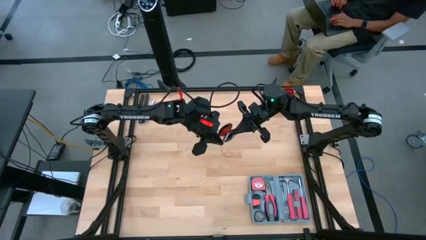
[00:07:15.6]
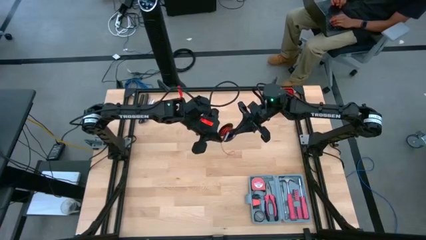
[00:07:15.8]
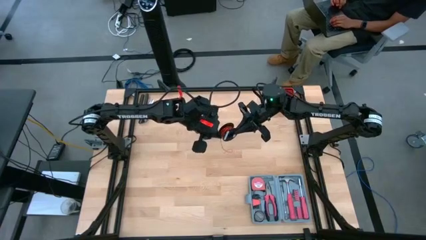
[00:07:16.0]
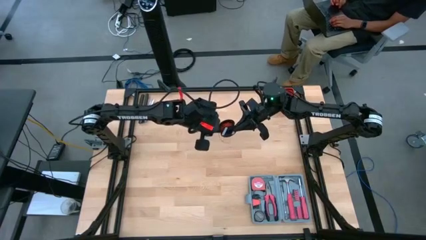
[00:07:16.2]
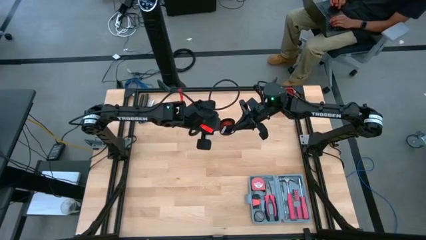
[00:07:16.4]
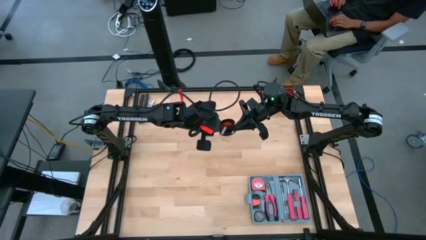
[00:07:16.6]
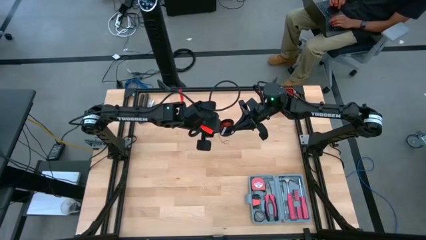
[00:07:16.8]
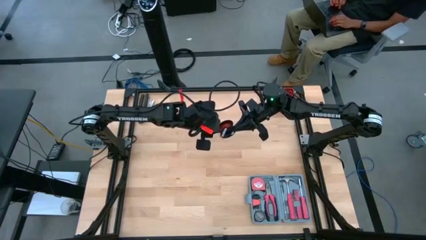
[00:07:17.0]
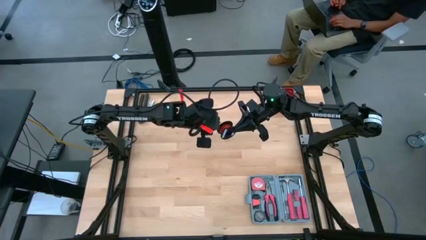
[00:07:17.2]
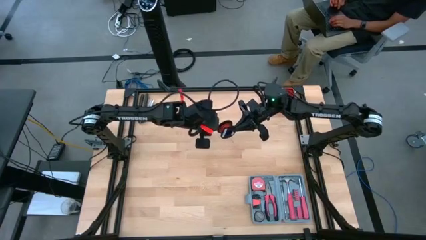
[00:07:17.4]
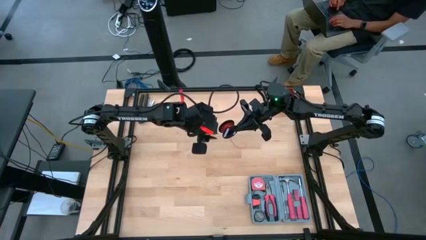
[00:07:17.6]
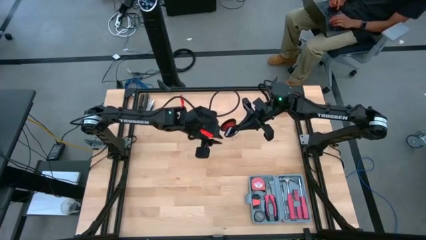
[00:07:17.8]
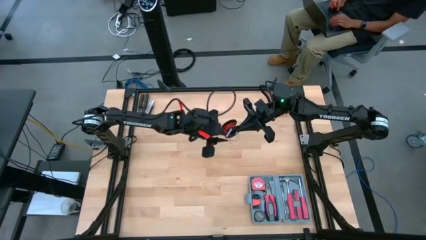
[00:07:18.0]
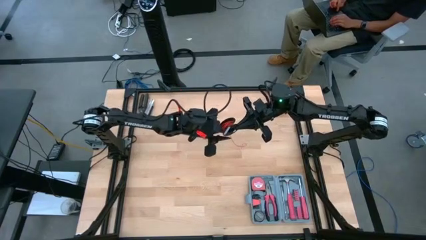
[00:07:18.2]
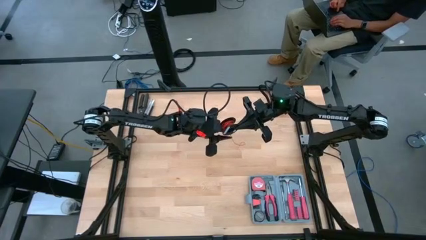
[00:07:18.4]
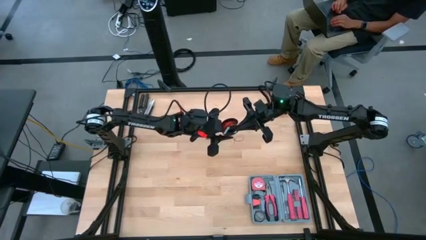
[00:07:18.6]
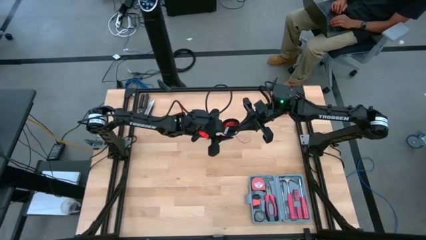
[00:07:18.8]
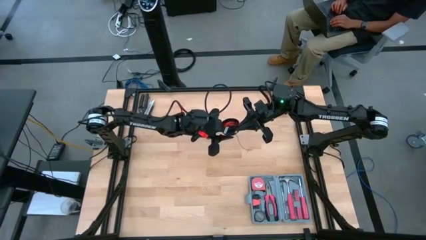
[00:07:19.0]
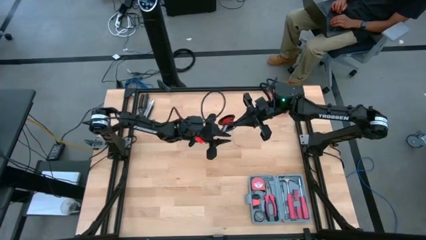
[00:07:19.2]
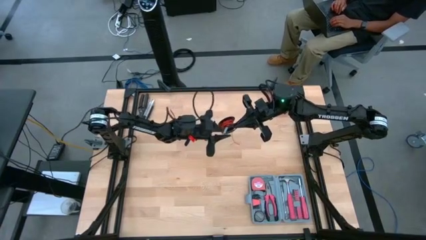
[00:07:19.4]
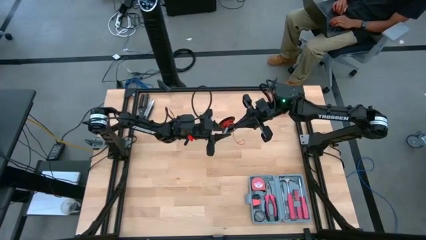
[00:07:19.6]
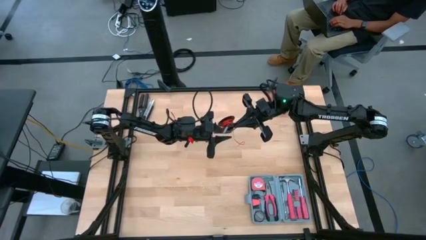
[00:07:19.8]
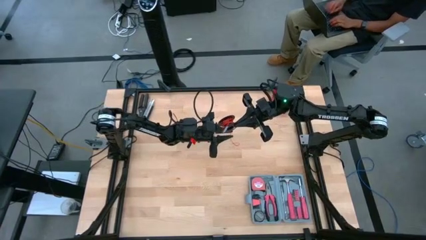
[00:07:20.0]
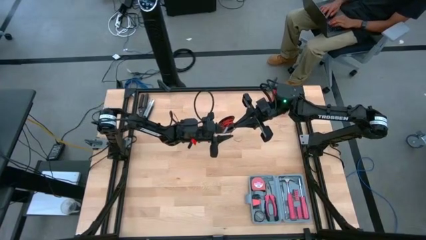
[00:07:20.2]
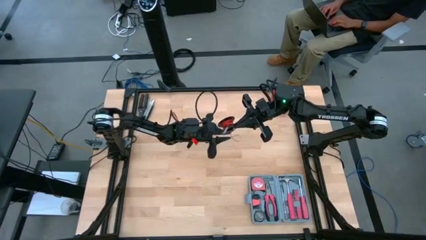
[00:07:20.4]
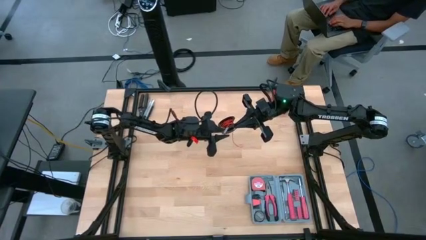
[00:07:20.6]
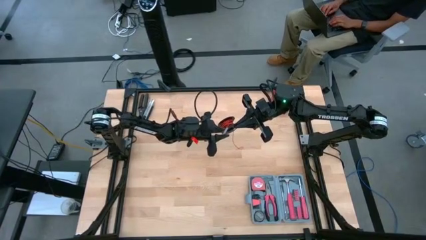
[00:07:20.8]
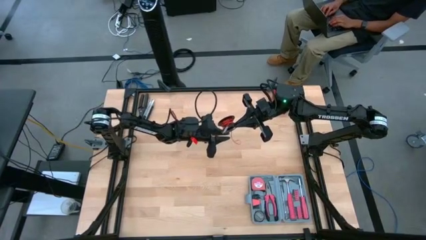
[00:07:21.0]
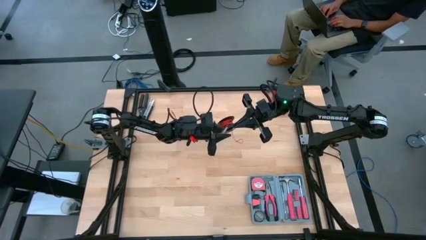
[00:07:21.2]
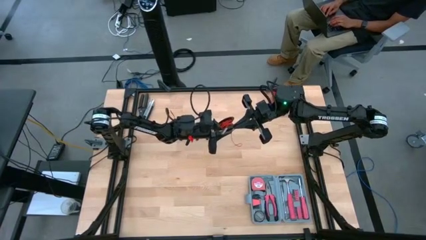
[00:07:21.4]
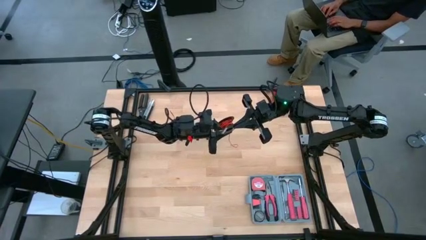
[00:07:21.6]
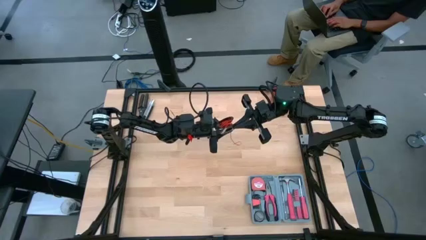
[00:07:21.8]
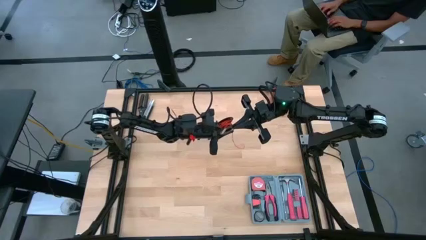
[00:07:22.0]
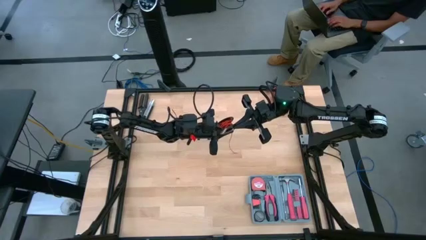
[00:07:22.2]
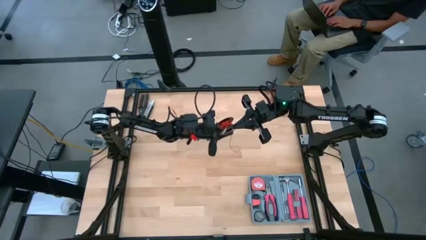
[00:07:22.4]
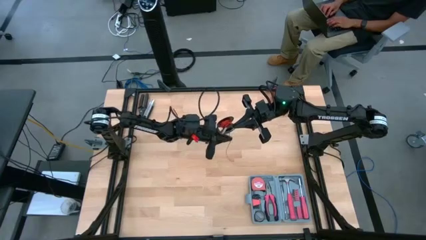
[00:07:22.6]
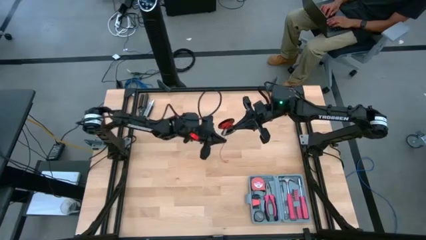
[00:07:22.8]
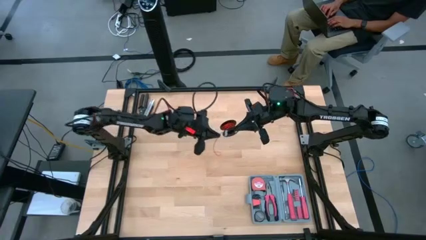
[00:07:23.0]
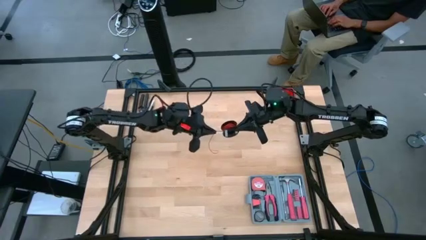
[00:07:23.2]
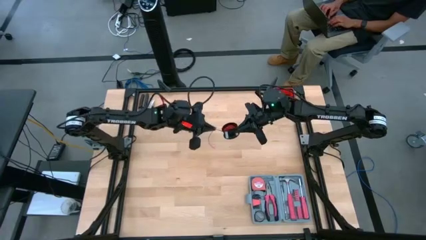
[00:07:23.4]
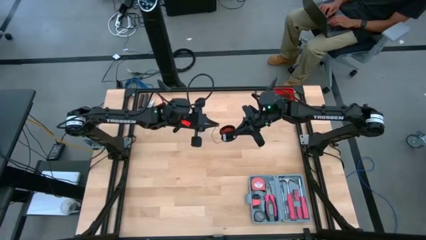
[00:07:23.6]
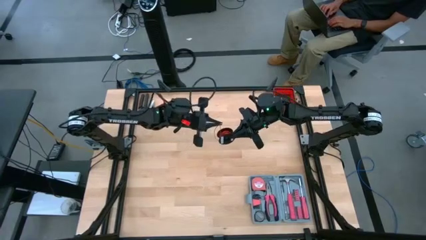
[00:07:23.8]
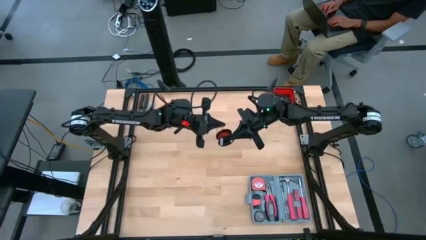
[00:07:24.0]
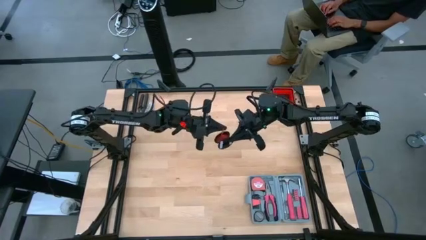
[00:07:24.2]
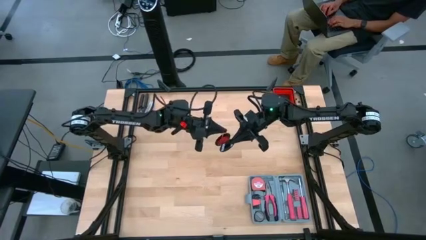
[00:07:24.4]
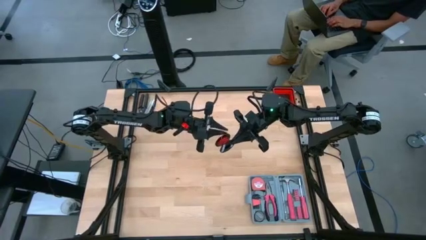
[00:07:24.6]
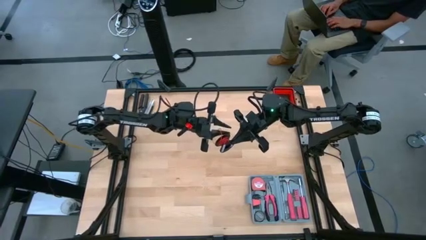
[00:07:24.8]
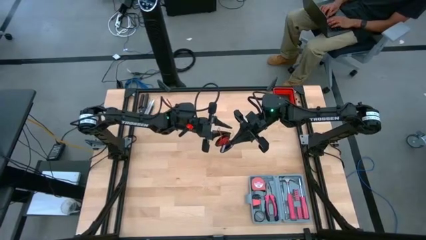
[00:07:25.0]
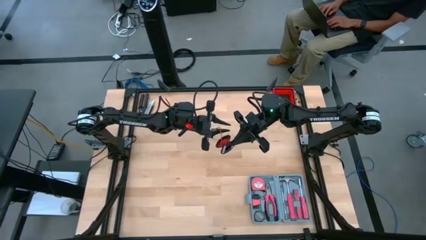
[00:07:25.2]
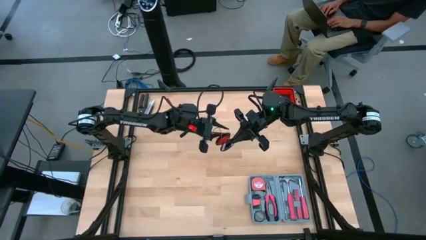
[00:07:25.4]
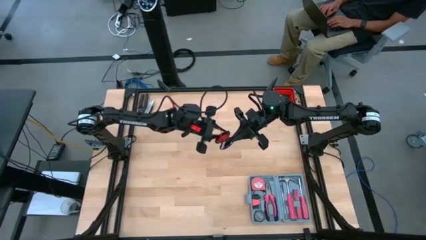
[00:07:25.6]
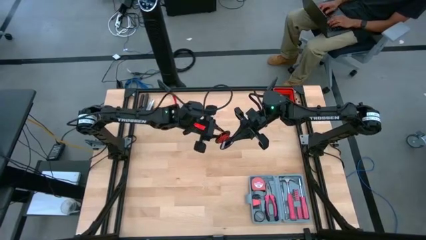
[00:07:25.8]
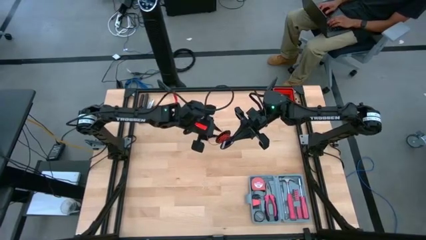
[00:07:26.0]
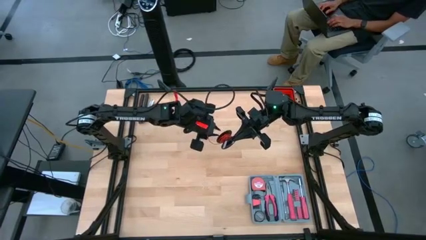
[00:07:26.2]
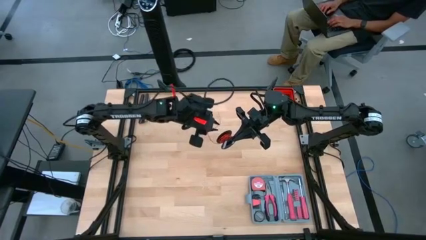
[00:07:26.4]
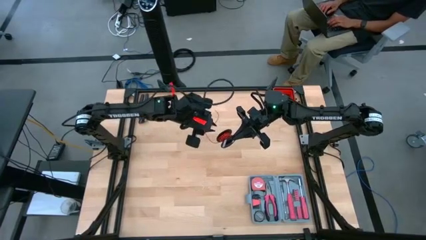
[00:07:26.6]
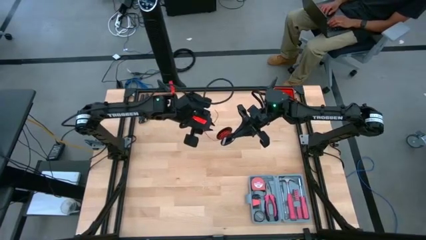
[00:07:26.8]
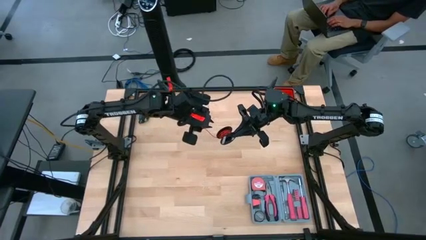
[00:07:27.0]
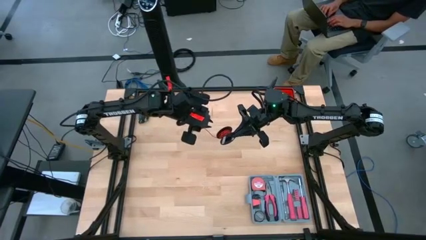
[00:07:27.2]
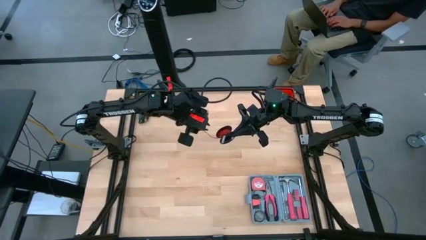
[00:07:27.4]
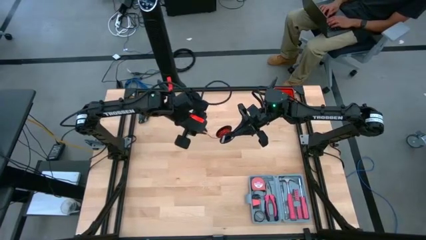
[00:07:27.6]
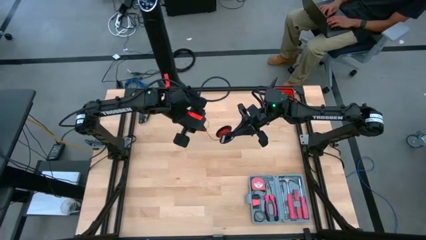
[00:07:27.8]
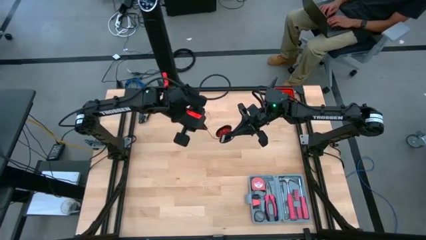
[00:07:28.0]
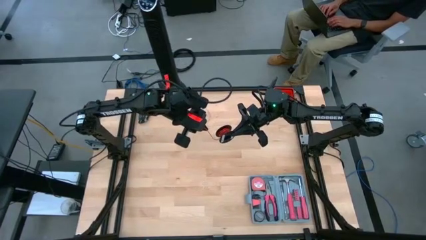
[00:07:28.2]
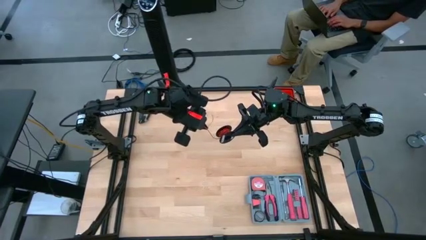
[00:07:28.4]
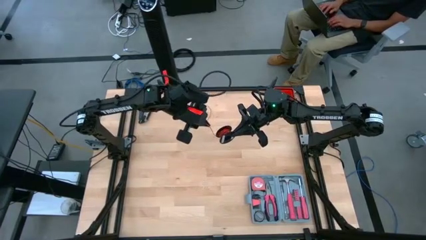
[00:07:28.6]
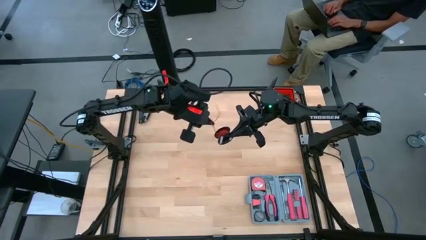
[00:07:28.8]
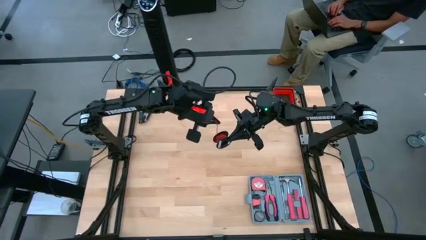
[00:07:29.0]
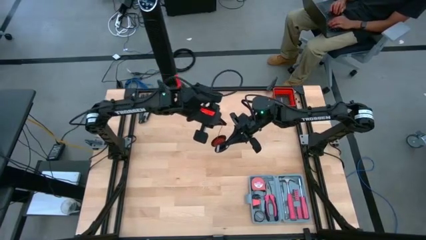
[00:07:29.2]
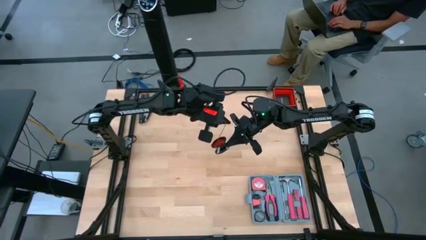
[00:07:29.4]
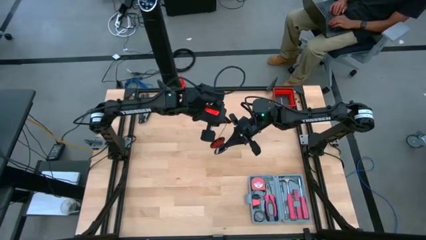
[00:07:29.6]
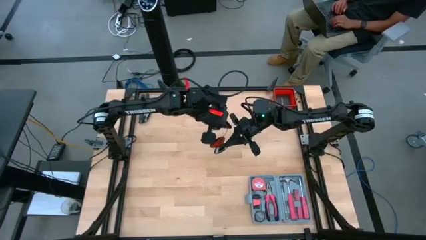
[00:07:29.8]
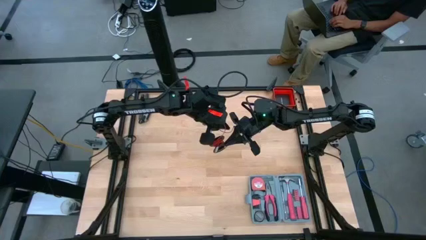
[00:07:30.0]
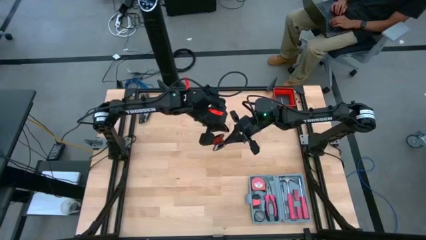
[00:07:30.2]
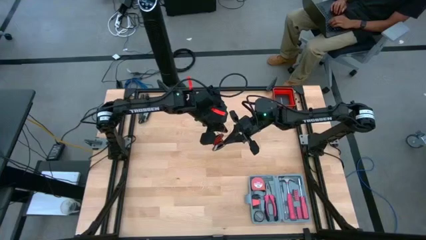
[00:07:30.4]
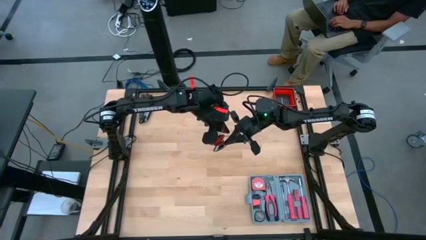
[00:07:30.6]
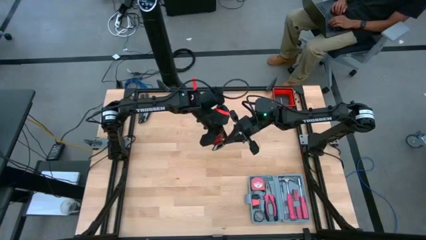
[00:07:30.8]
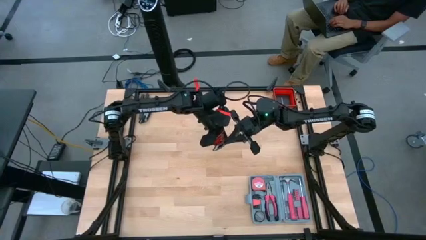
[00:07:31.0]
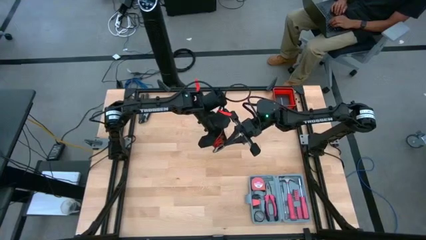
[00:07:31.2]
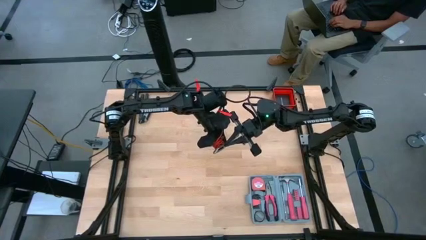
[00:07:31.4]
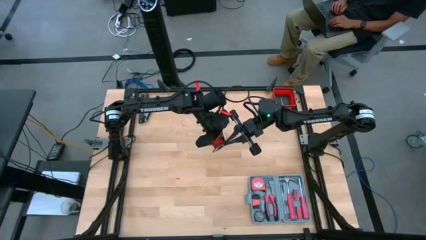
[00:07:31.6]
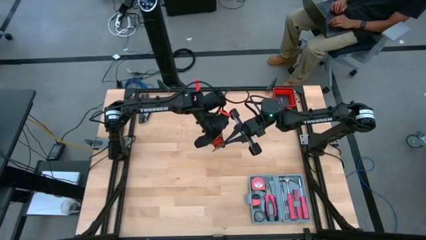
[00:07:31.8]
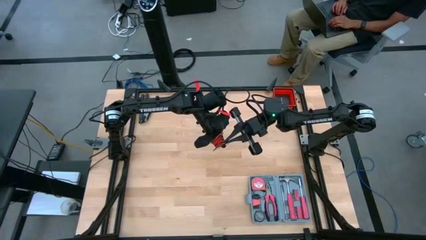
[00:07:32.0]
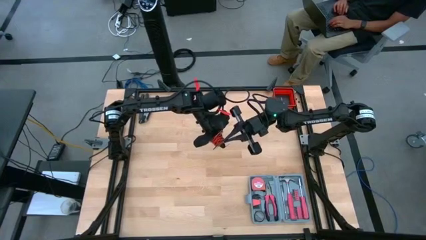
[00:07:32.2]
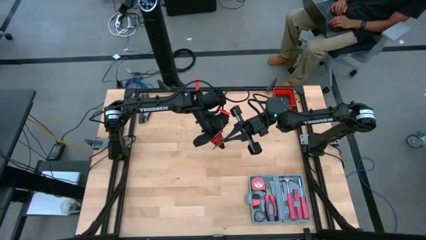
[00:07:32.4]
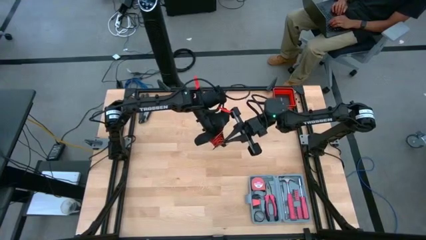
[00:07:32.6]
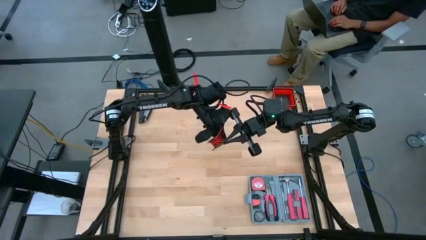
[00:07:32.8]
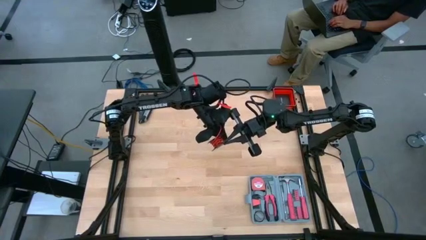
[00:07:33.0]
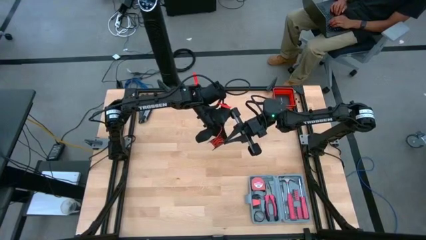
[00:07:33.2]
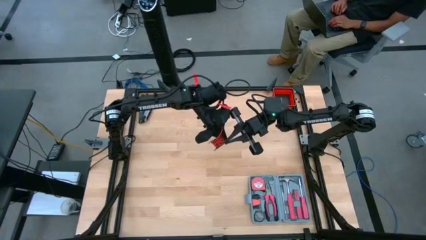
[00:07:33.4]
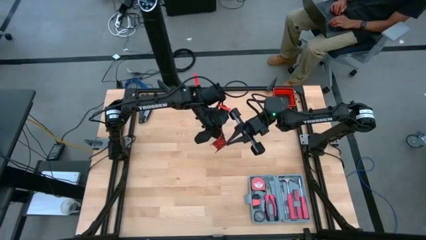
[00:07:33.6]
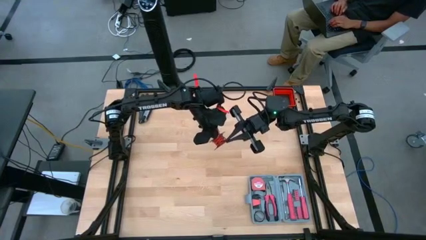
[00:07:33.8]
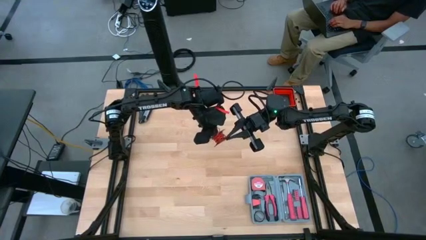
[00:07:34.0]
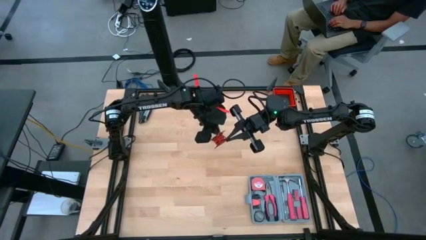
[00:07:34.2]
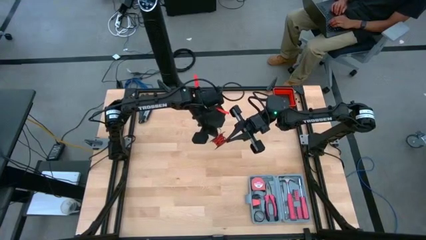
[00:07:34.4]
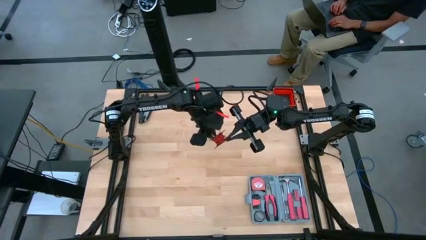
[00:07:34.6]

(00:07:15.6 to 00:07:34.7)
Task: Coil cords
Coil the wire
